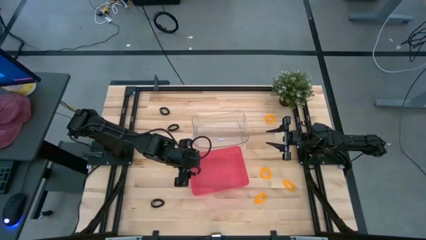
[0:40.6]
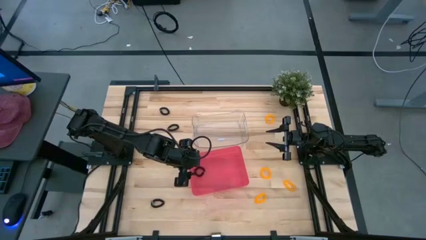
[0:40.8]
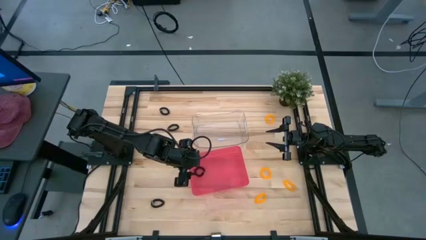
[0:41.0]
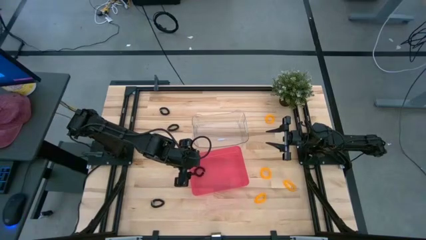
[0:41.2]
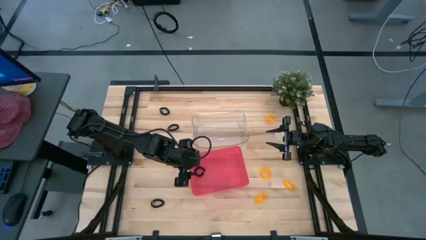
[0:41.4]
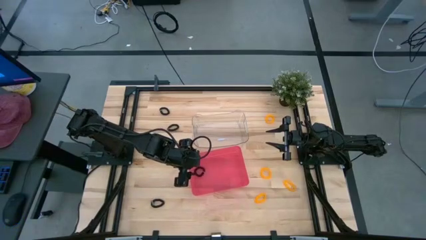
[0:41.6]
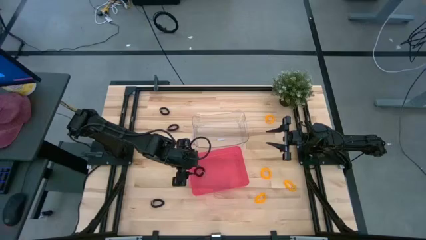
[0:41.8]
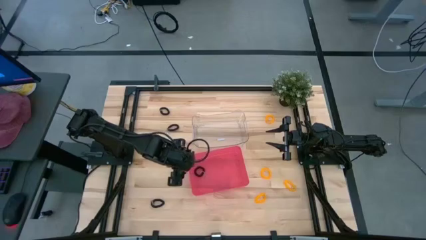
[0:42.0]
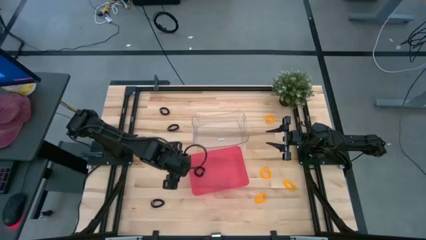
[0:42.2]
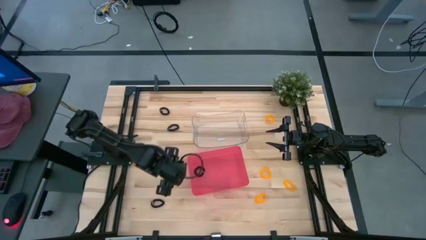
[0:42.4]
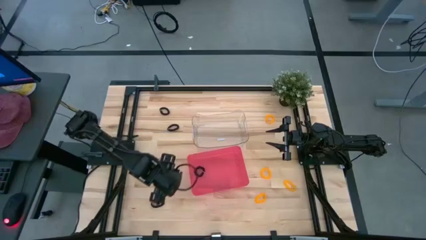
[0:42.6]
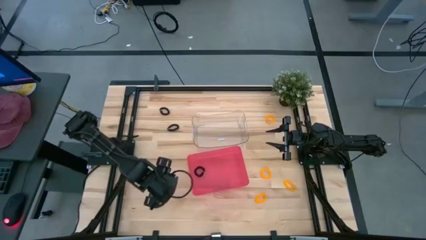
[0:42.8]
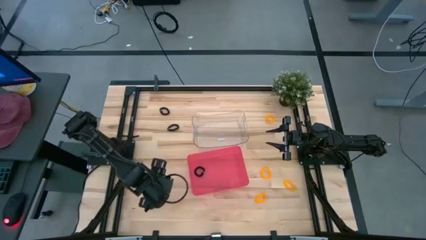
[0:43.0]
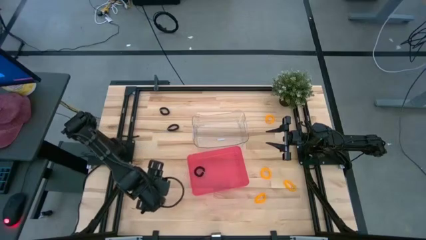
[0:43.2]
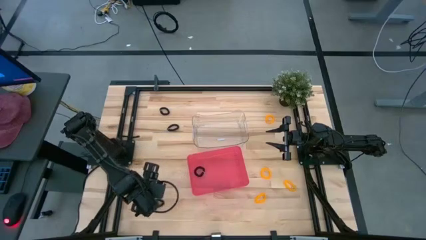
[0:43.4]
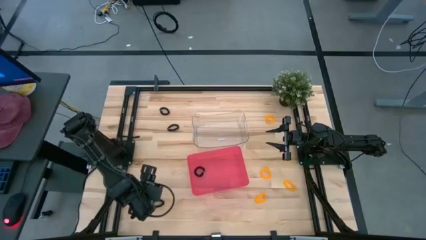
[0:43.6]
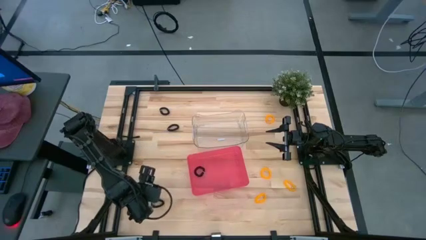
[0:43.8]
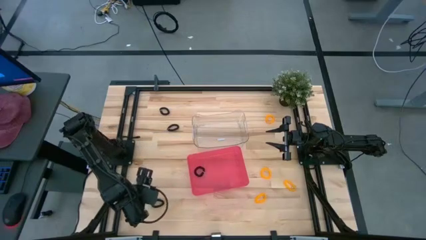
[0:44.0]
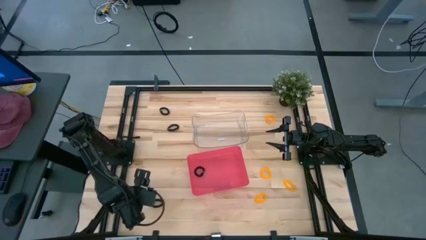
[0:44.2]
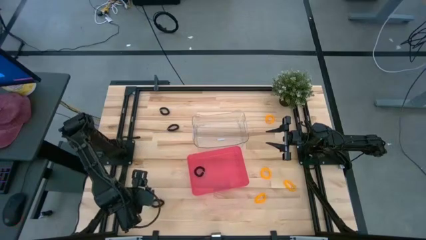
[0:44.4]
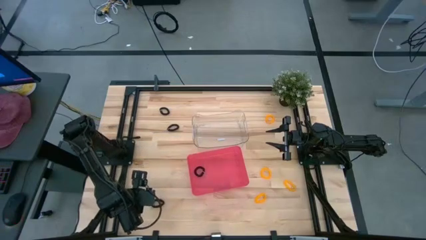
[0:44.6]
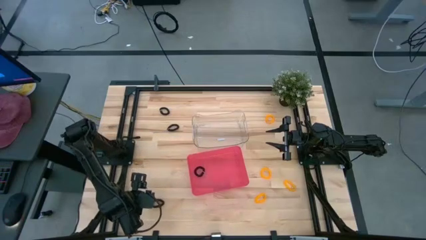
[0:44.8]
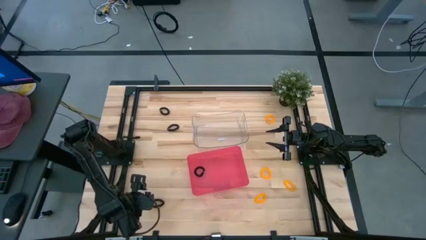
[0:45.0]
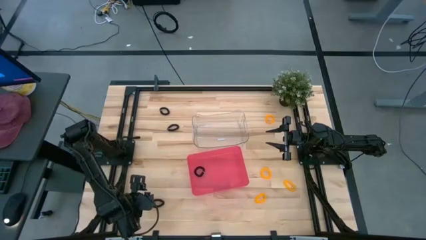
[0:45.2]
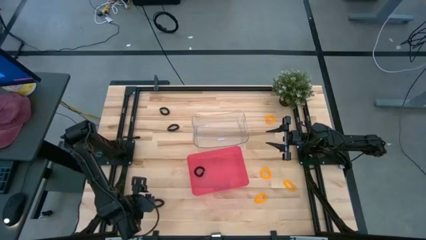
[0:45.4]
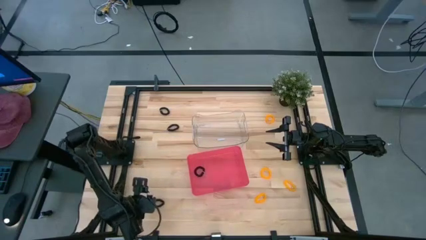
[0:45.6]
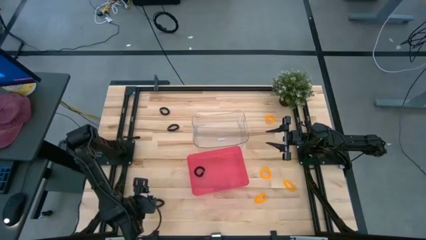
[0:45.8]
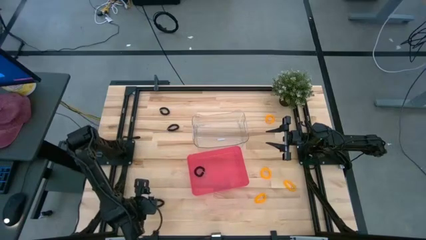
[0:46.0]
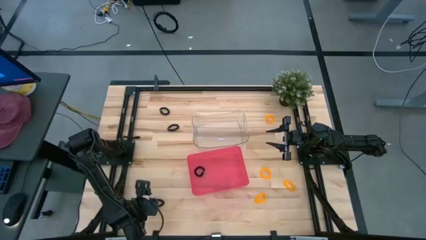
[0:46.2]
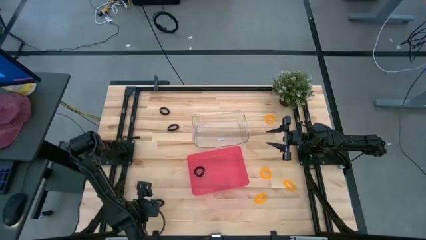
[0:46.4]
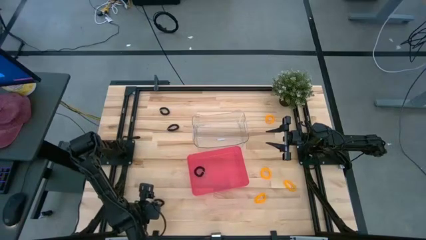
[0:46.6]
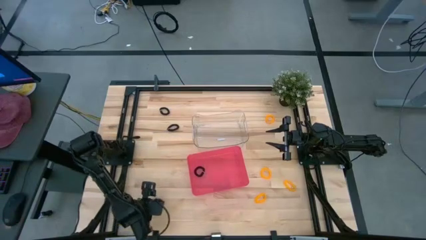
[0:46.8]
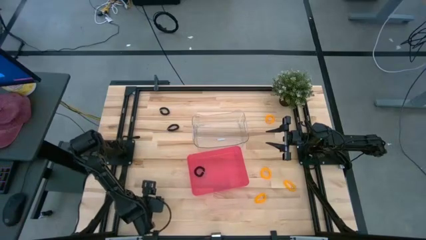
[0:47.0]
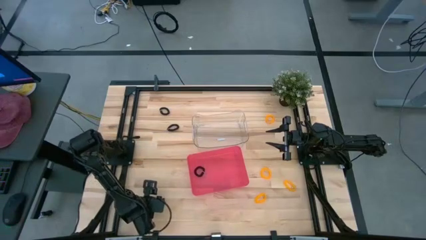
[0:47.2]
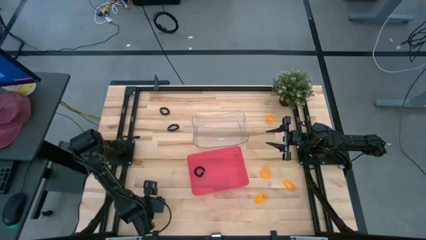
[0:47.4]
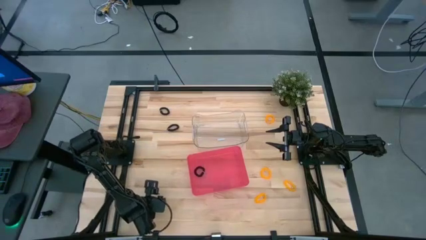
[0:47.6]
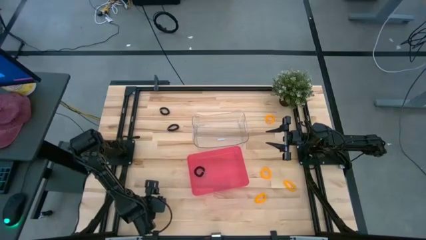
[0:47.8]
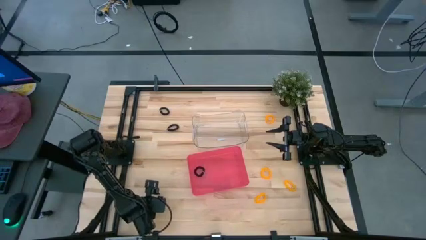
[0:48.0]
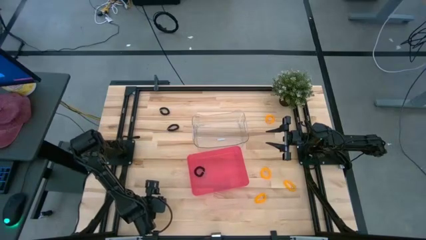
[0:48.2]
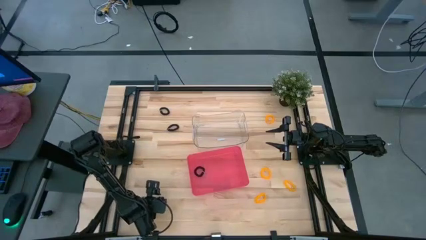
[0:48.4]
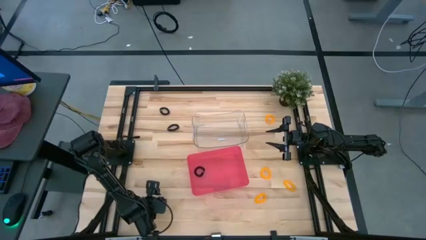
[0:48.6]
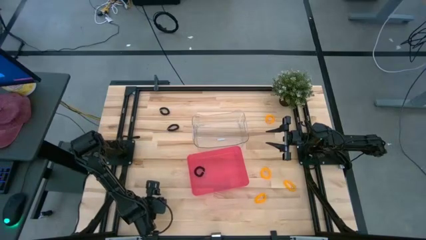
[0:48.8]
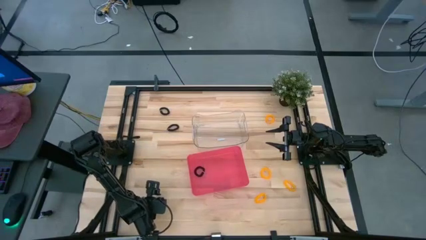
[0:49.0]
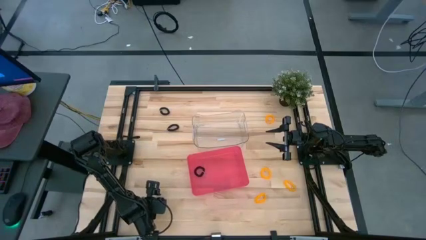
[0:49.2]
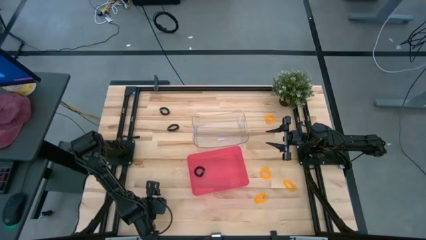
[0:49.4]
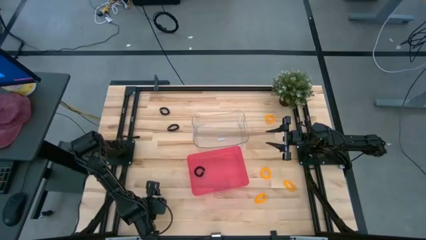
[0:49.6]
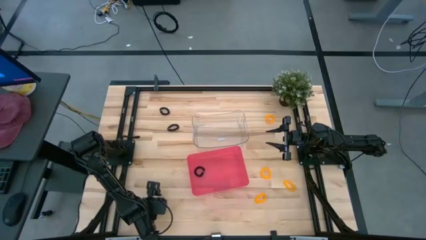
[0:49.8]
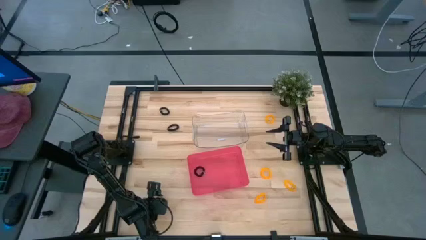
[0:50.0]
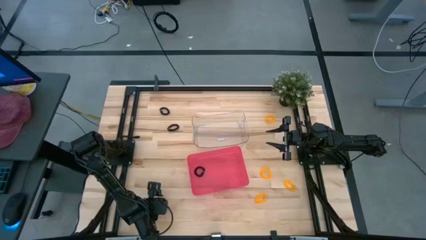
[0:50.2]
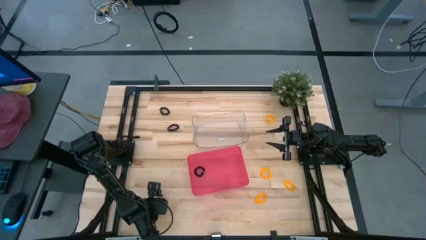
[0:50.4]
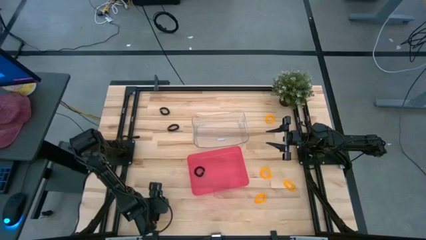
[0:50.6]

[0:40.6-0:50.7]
Task: Sort spring keychains
Put the bottom black spring keychain into the red bin
